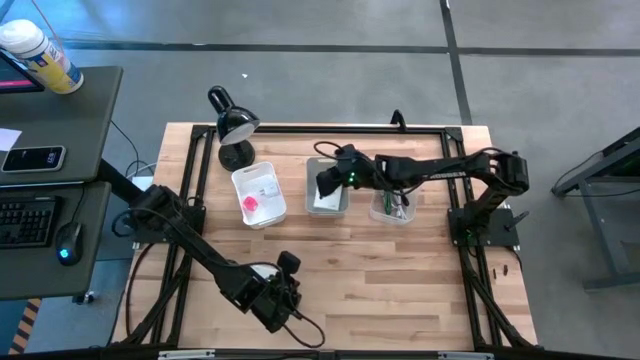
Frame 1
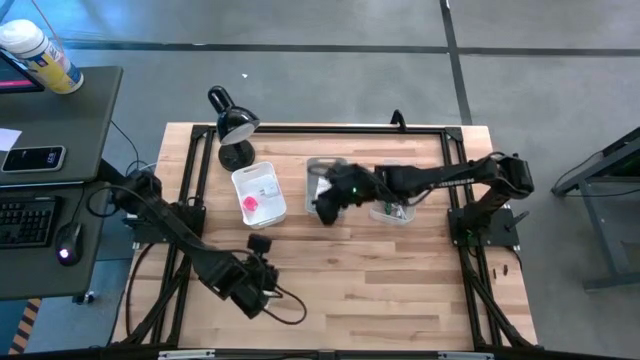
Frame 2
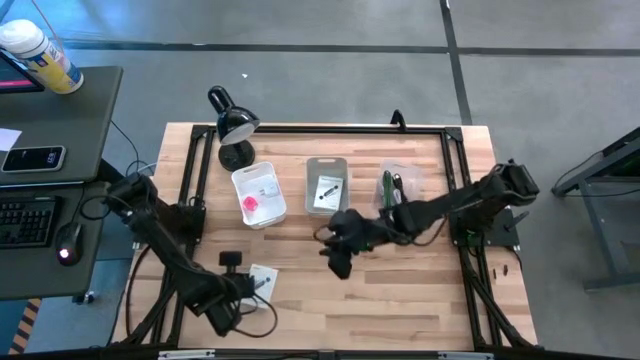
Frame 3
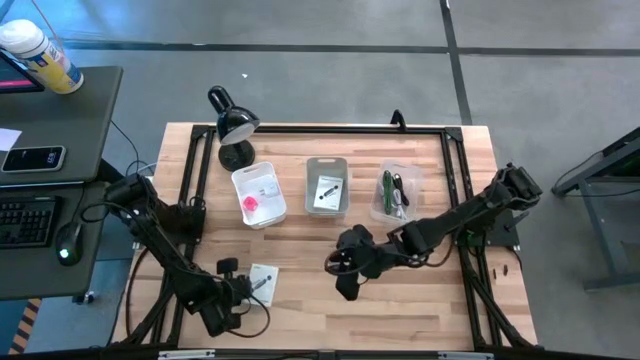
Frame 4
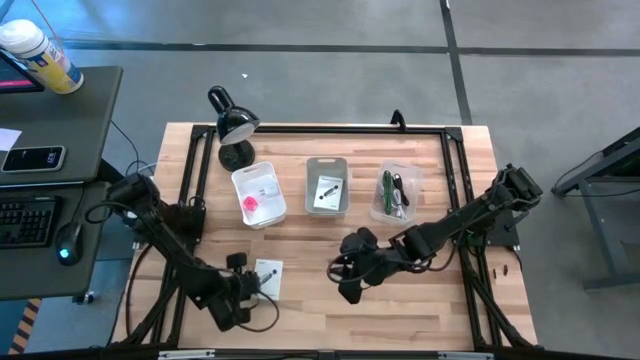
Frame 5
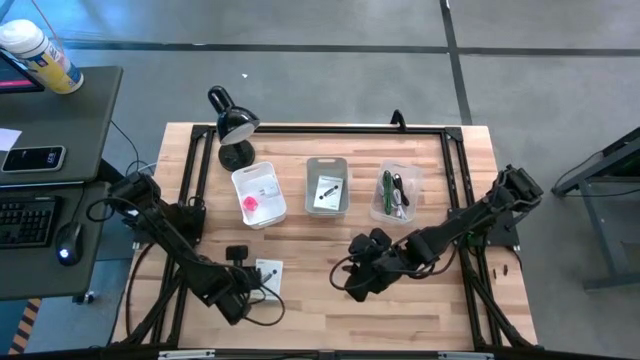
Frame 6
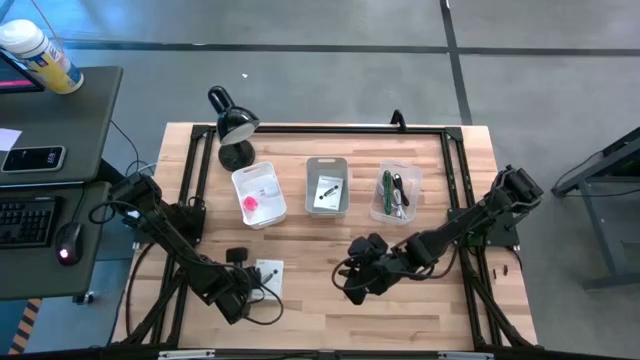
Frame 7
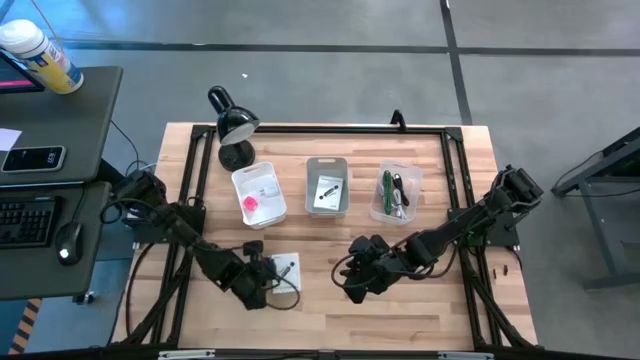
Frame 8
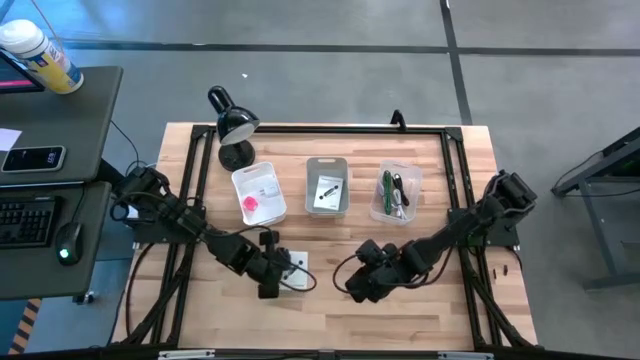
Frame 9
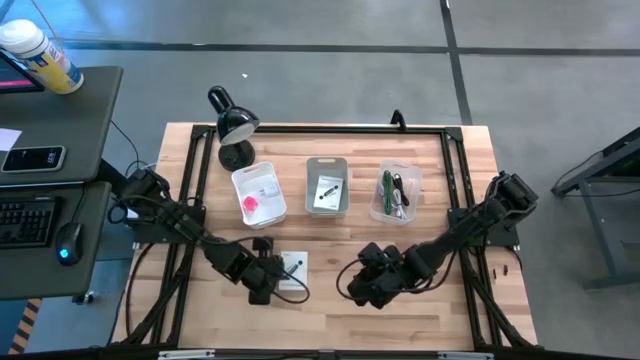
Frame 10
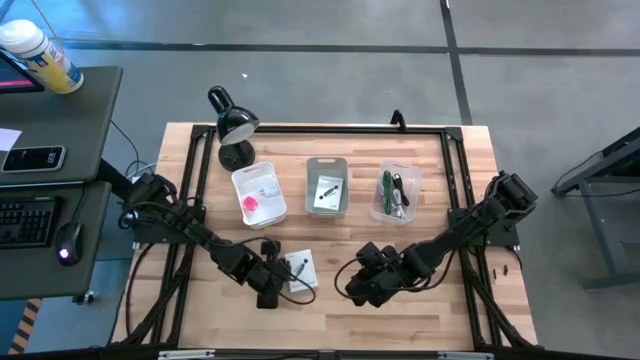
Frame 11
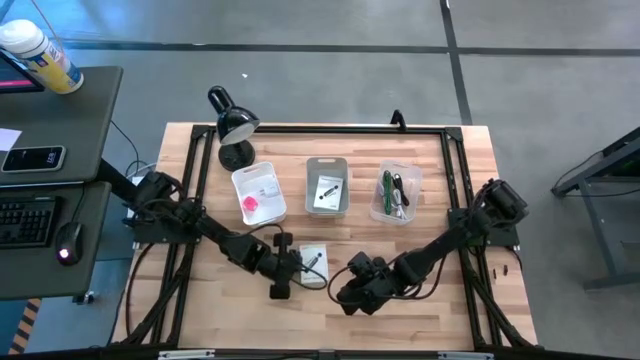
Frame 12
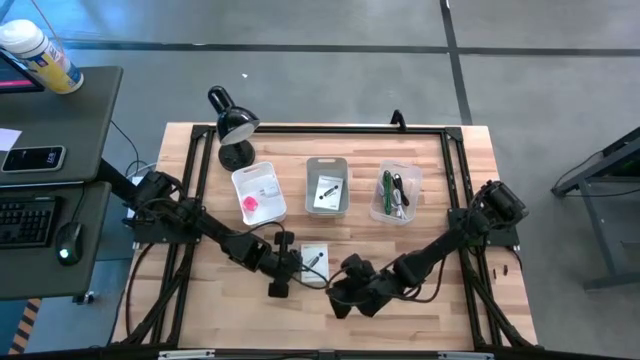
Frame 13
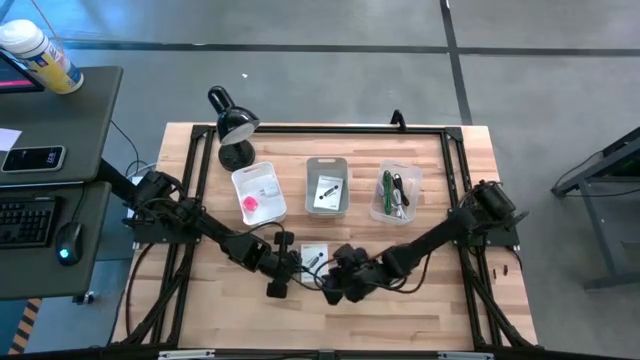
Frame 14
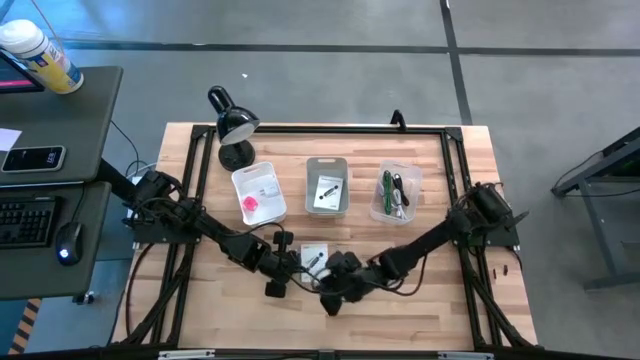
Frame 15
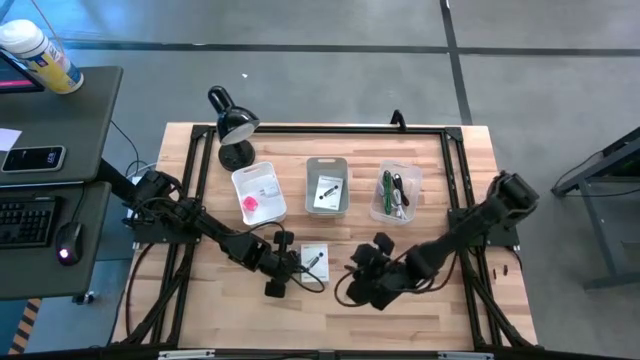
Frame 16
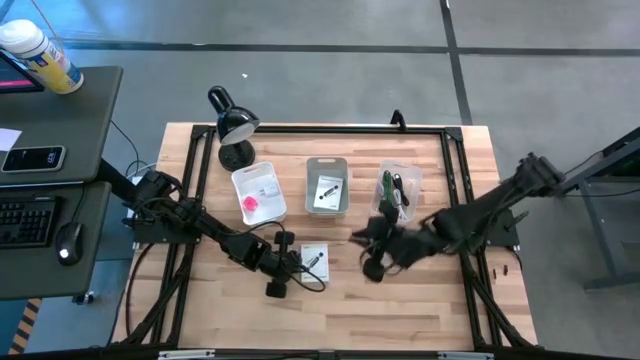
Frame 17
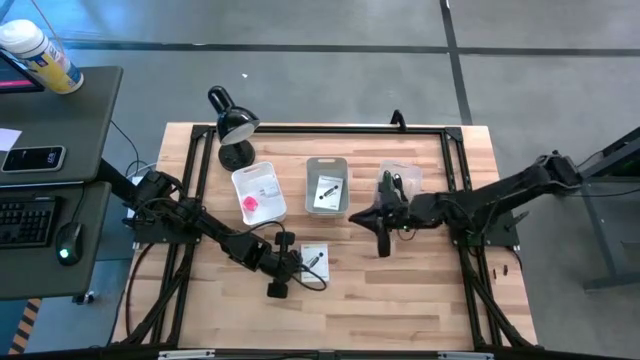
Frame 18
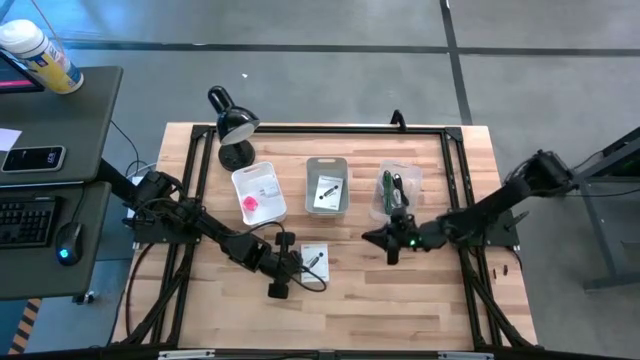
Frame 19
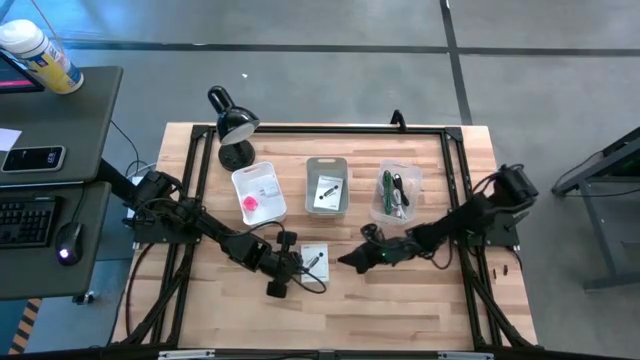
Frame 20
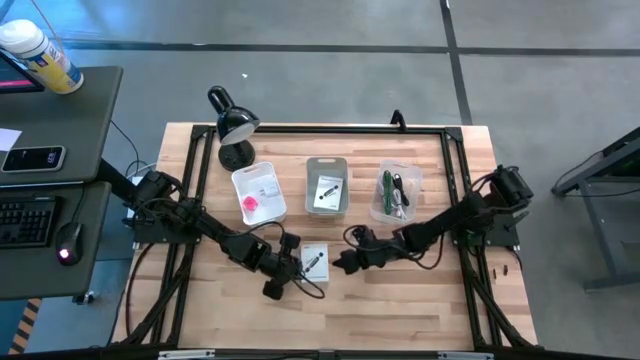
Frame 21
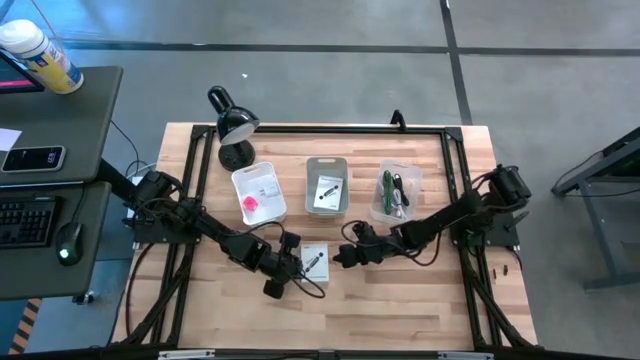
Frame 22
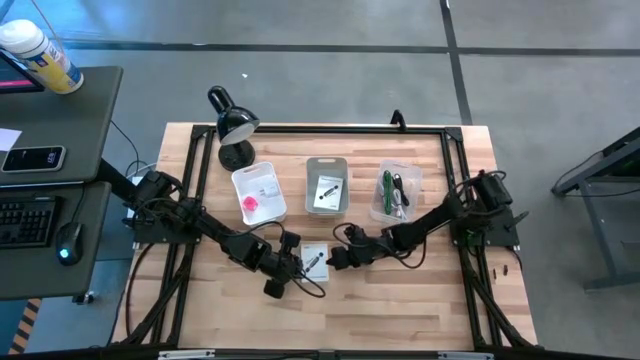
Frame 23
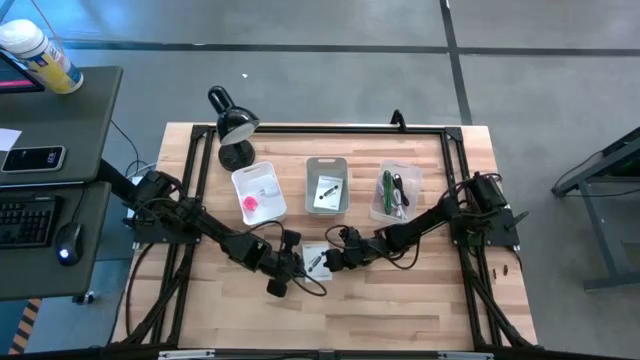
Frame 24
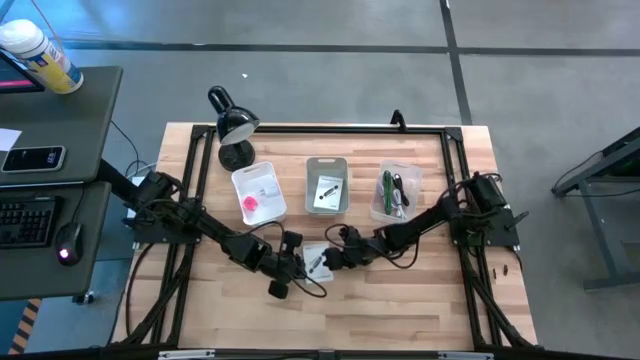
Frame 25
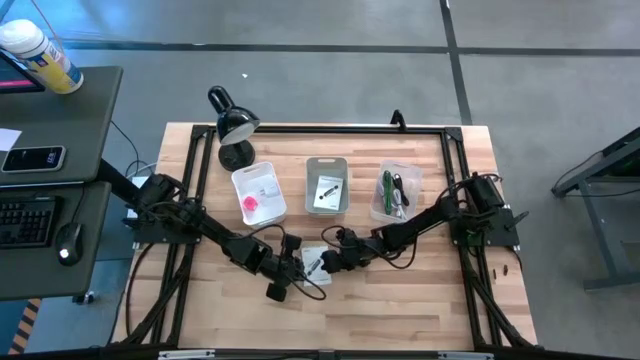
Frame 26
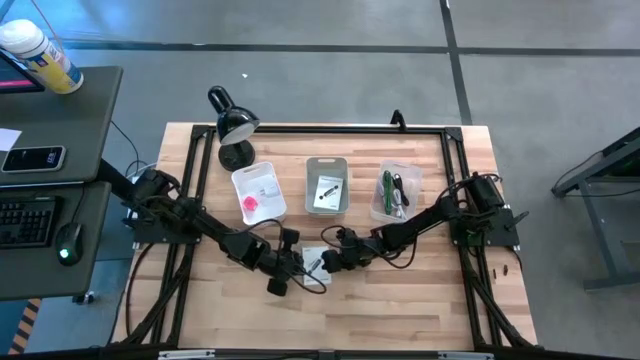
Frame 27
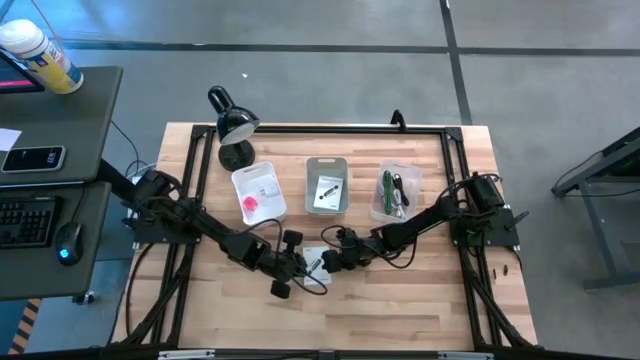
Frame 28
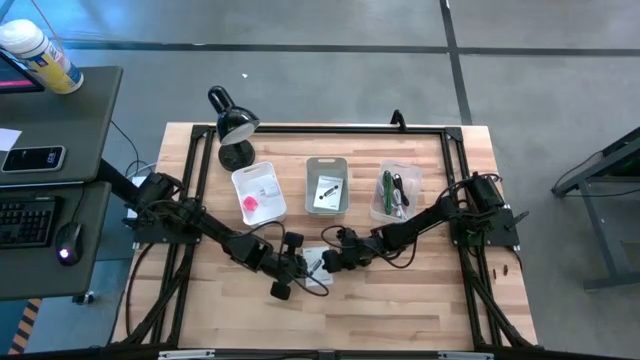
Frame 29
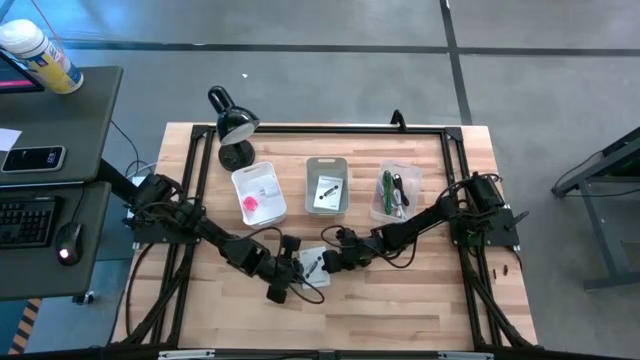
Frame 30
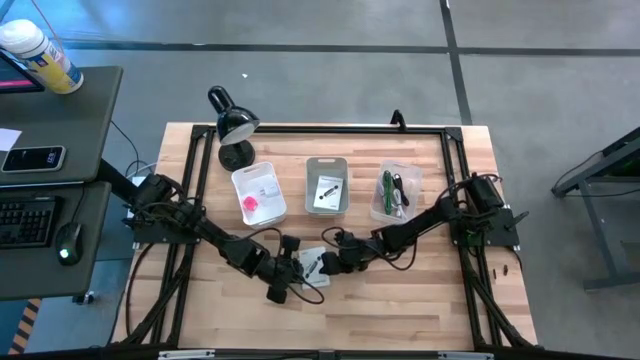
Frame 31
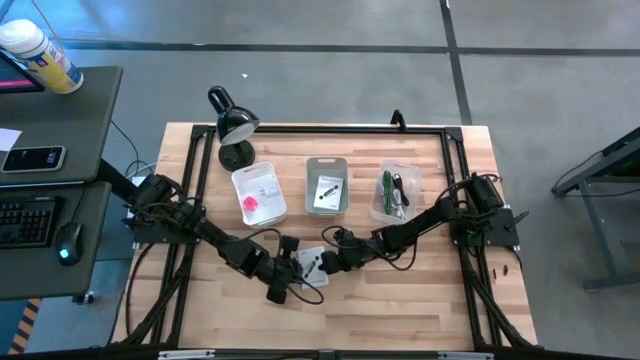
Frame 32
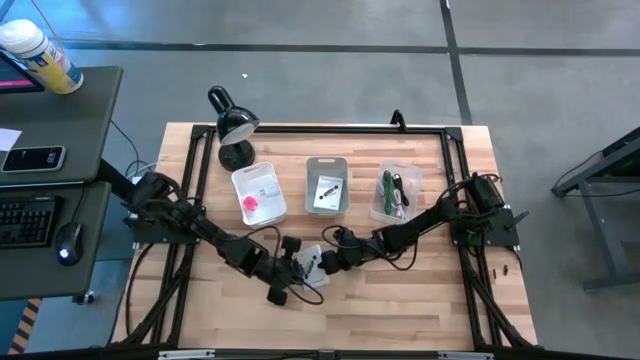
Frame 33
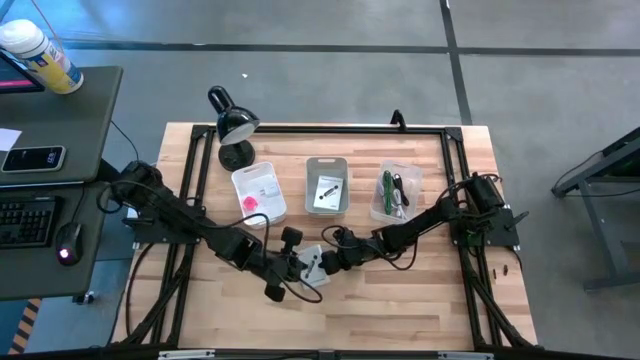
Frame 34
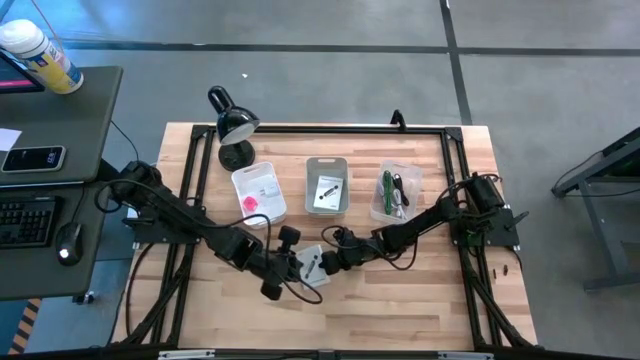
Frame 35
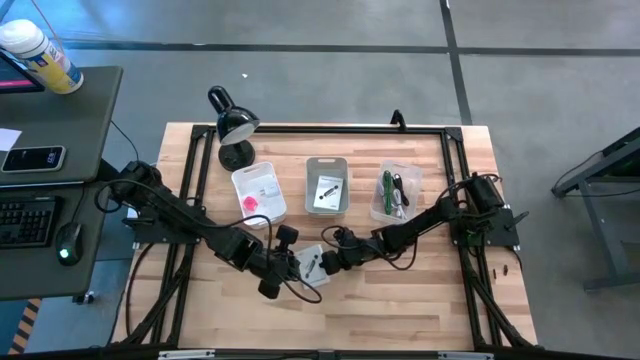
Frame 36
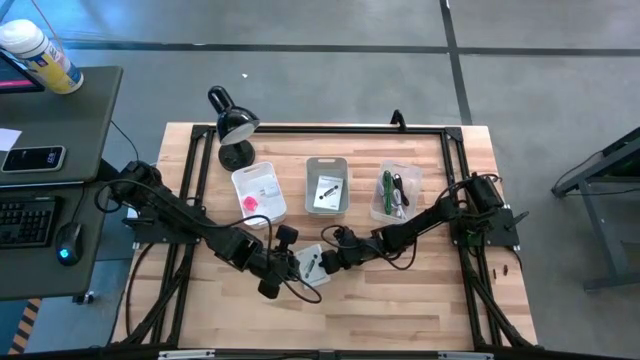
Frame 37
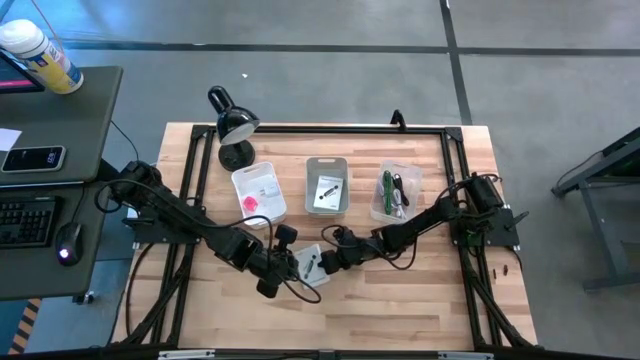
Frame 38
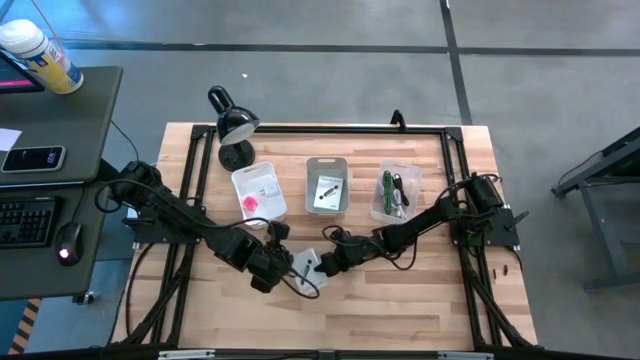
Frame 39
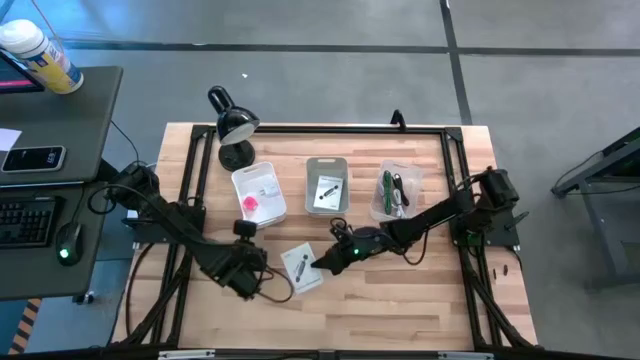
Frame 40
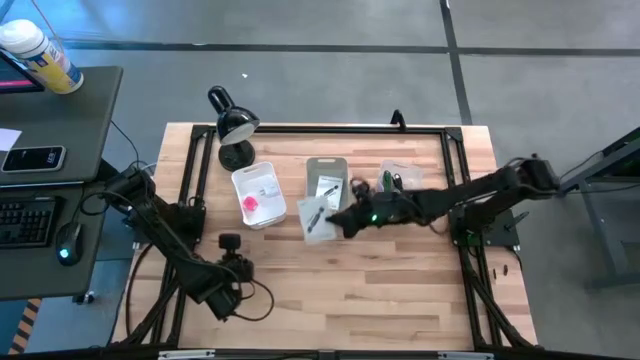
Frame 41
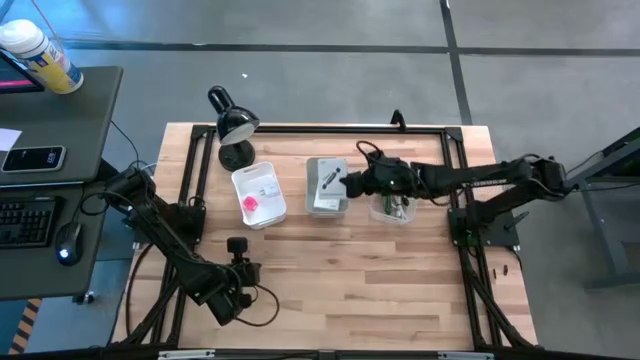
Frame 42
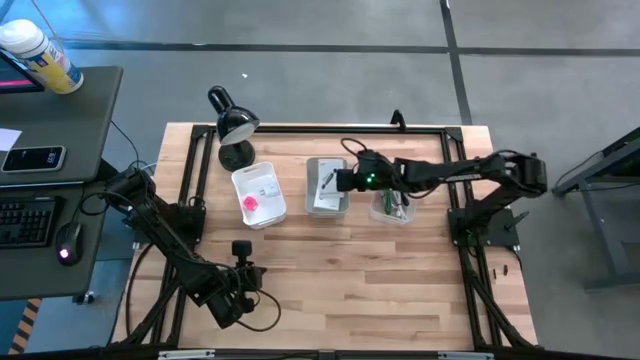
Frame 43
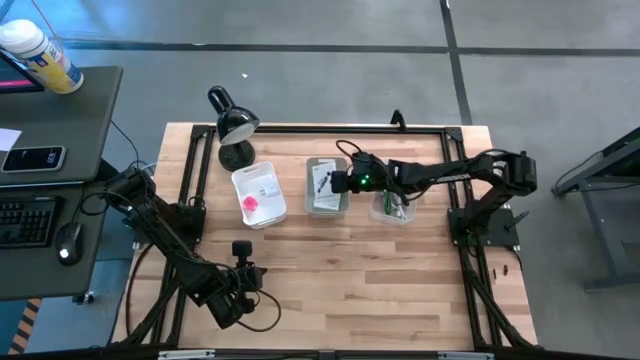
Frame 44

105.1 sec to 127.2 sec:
Task: Pick and place items into bin
Put the white card reader box into the gray bin
